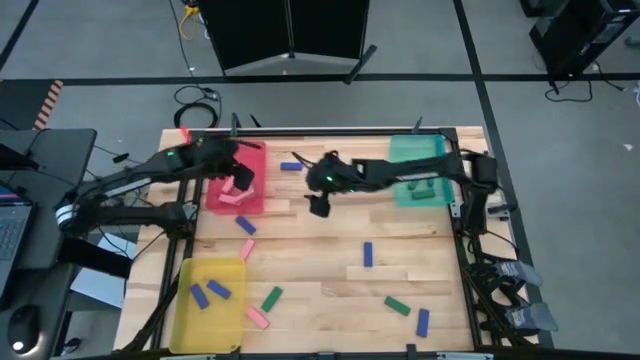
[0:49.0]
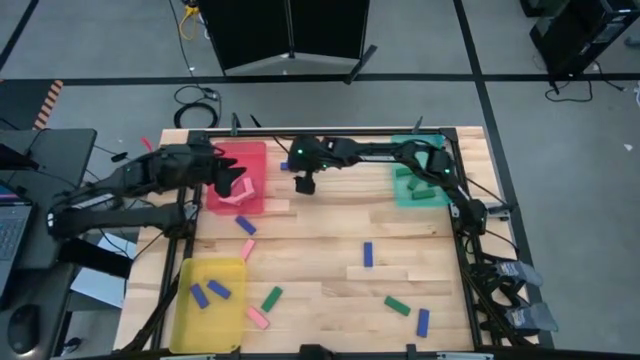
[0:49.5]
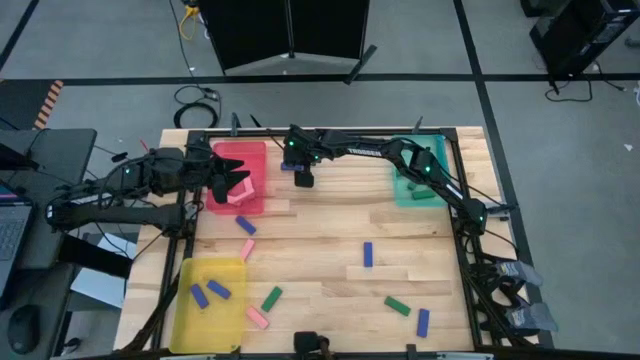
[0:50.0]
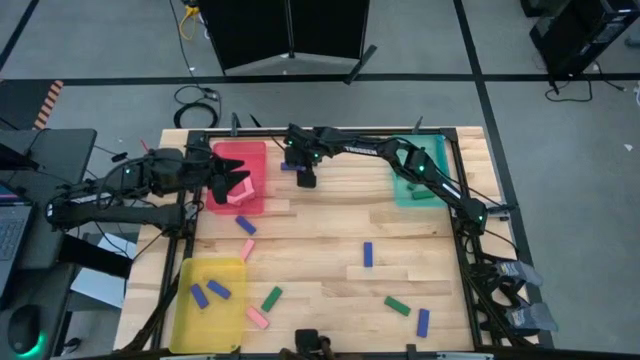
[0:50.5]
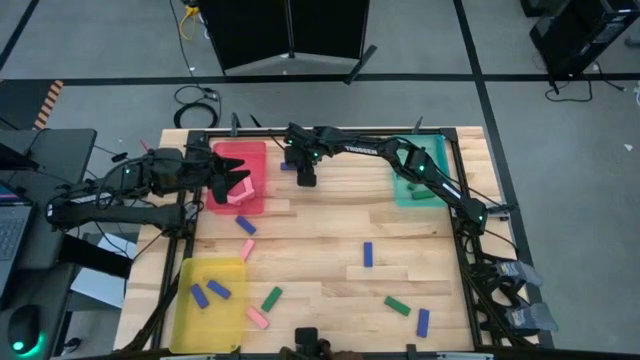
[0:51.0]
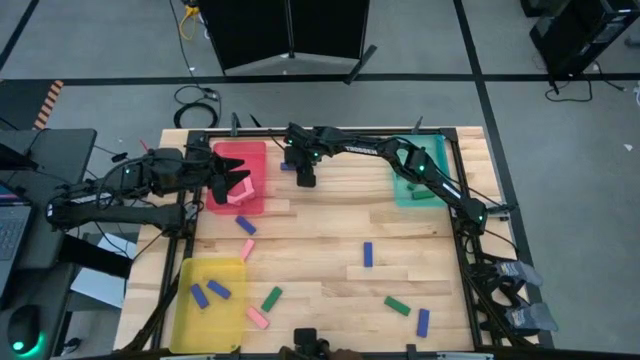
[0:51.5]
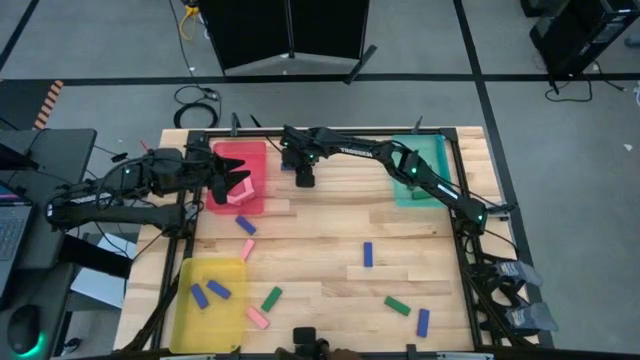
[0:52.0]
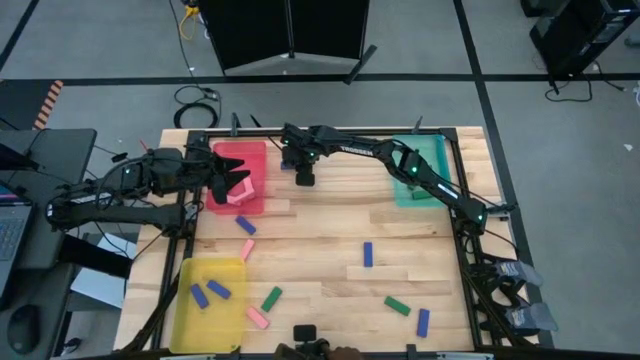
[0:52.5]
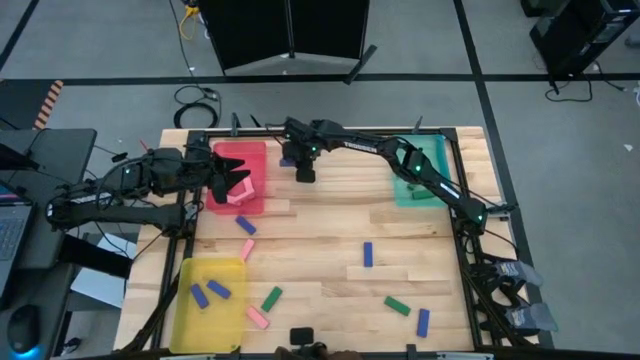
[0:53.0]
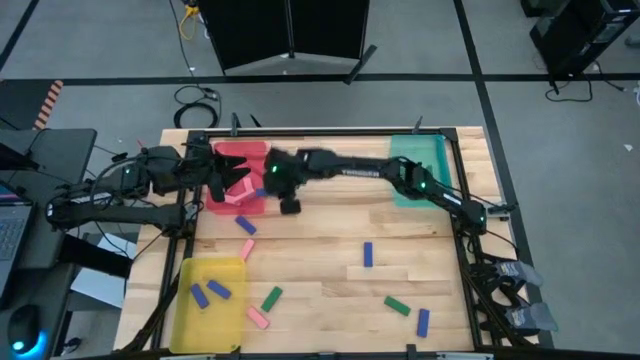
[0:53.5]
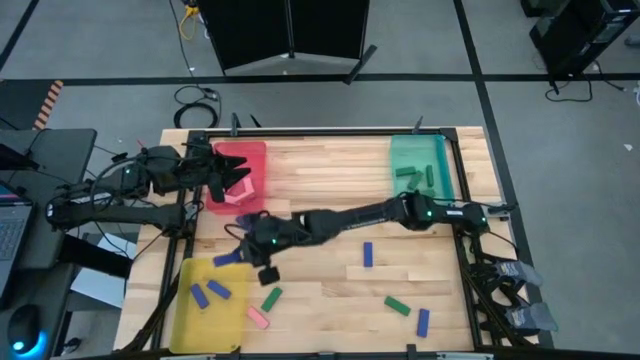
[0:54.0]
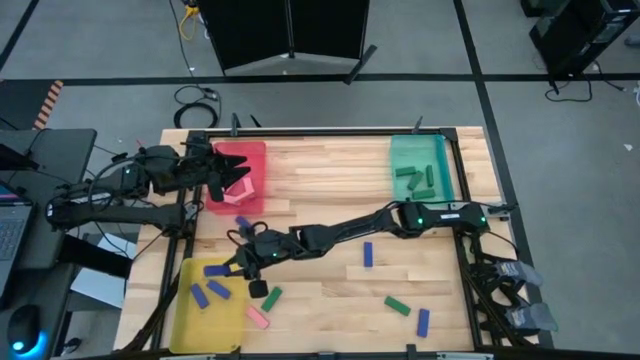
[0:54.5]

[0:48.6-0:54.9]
Task: Sort blocks
Put the blue block into the yellow bin

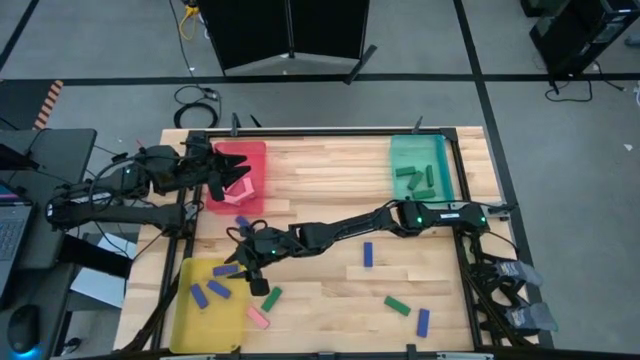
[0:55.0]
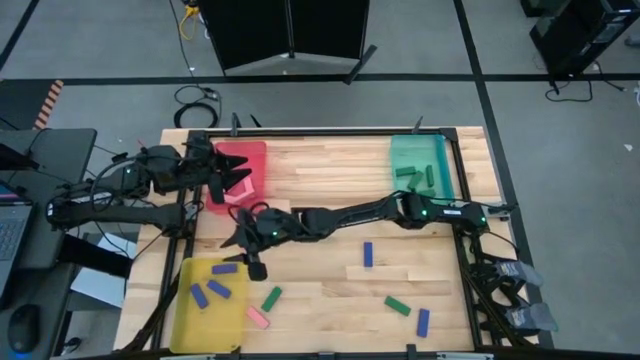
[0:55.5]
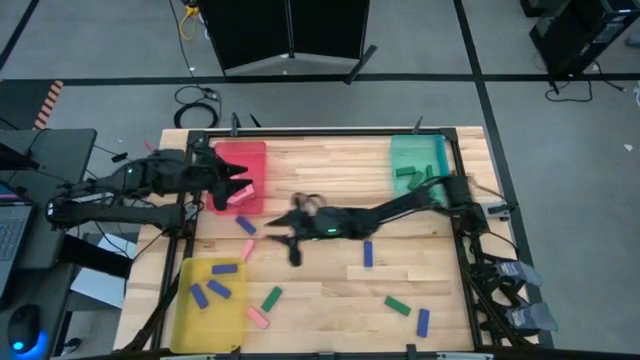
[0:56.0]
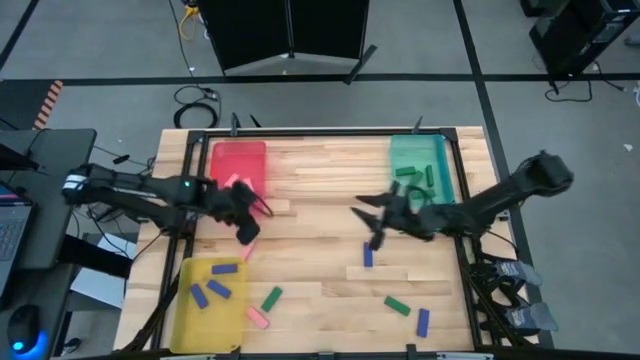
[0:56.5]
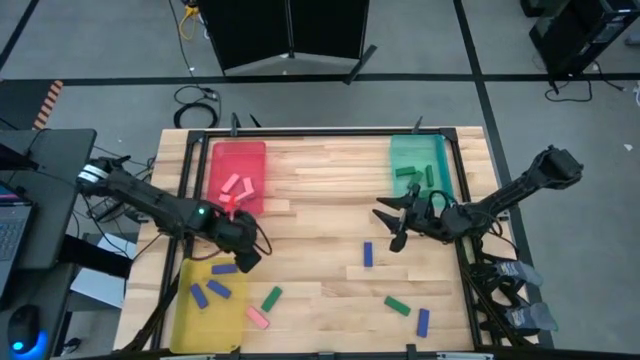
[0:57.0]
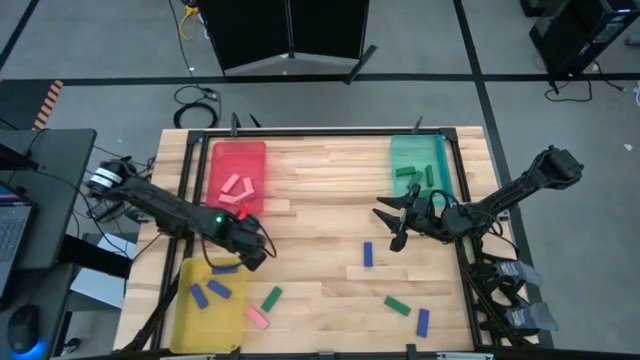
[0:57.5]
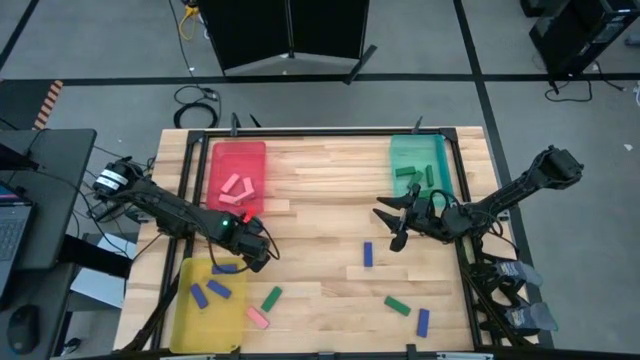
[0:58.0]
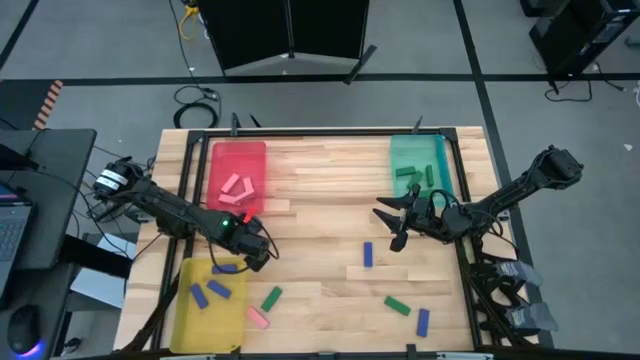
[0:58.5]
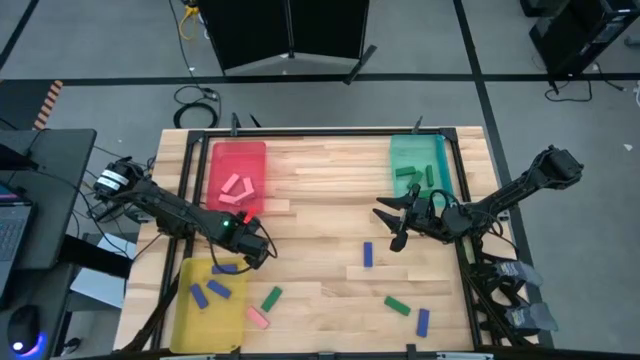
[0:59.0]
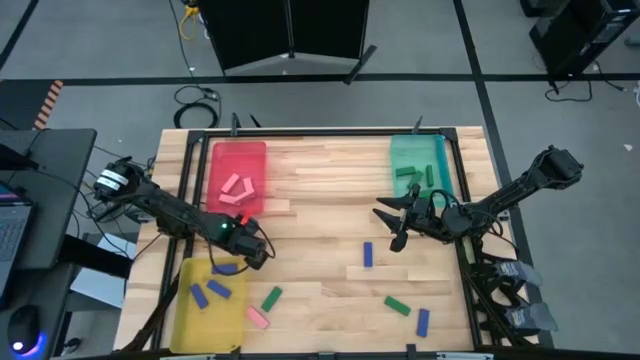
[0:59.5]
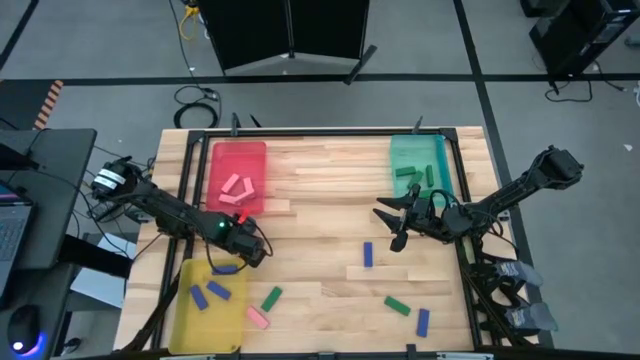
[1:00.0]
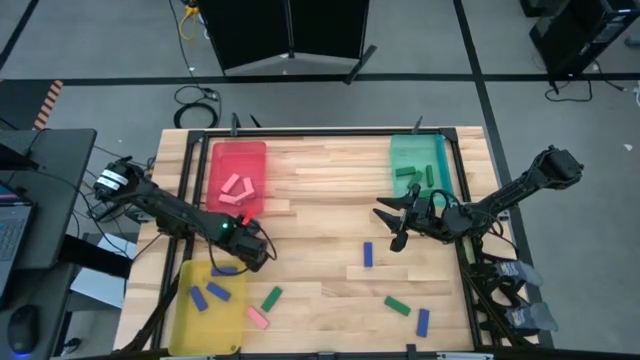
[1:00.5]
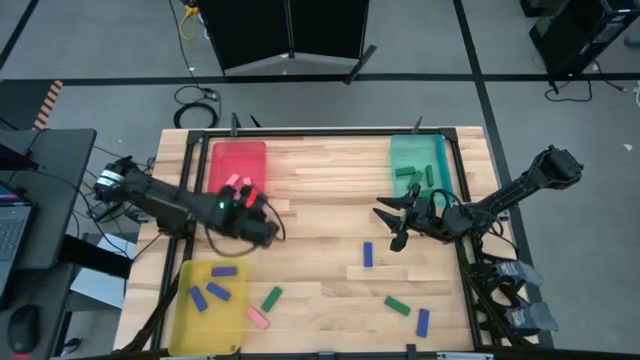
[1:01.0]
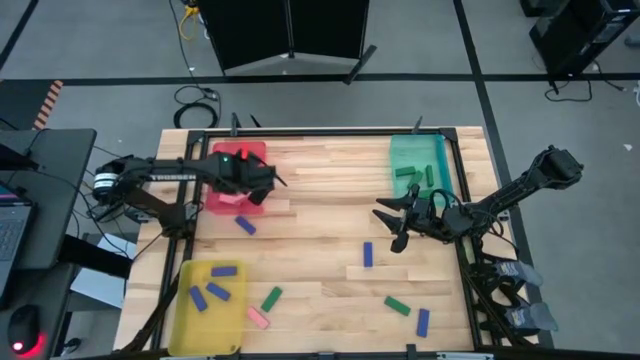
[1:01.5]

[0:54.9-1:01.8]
Put the pink block into the red bin

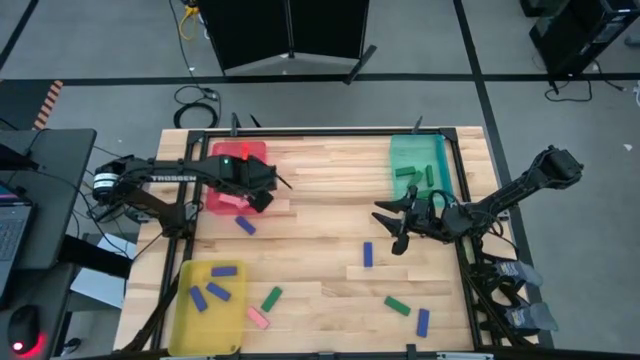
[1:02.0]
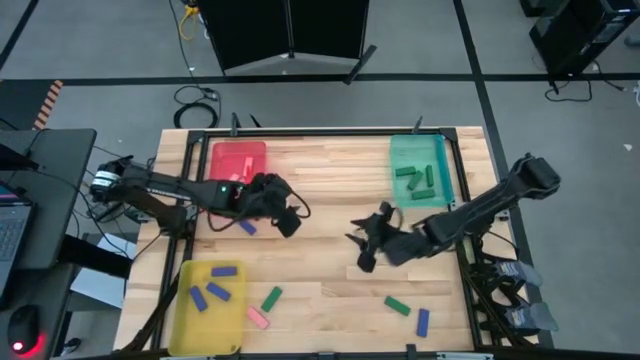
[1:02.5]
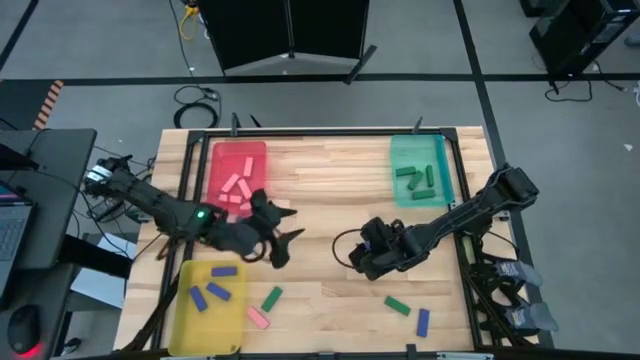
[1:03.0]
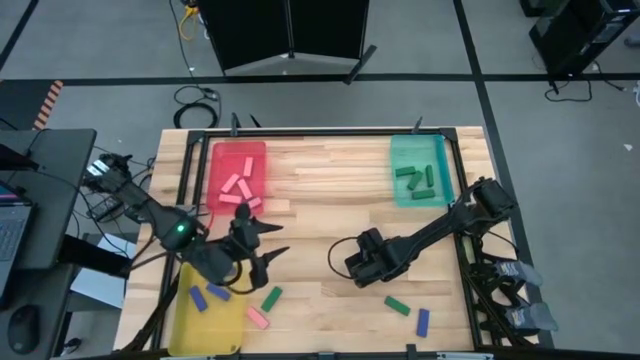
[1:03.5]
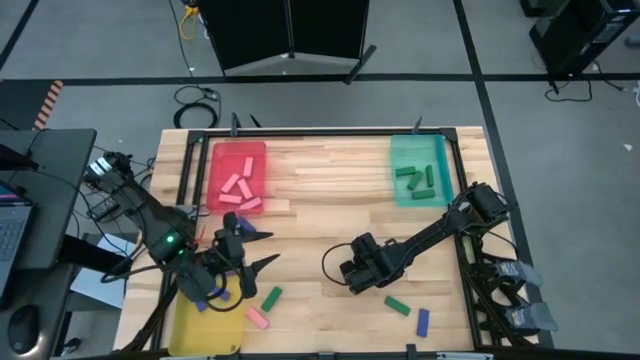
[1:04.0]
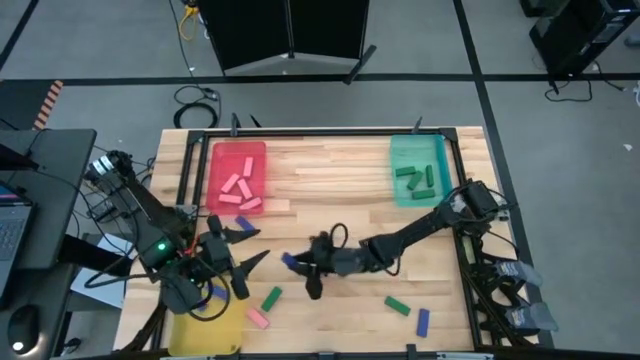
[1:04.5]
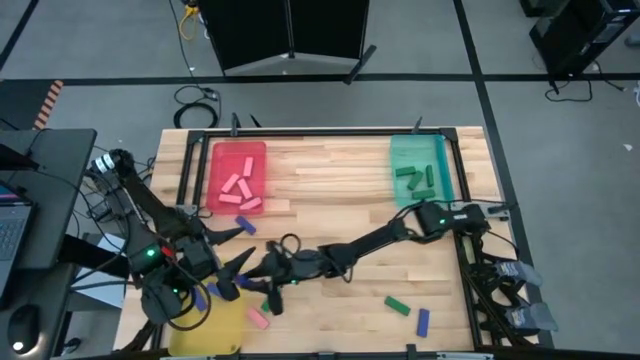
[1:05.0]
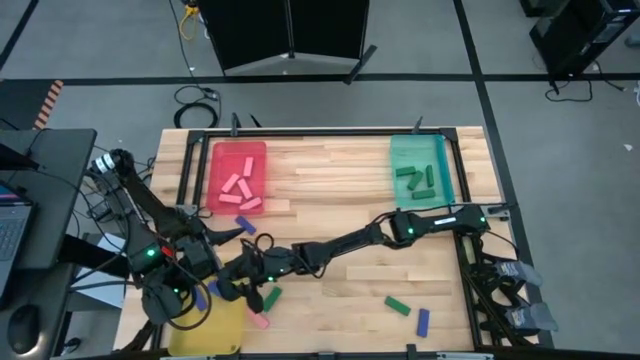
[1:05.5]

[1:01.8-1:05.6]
Put the blue block into the yellow bin

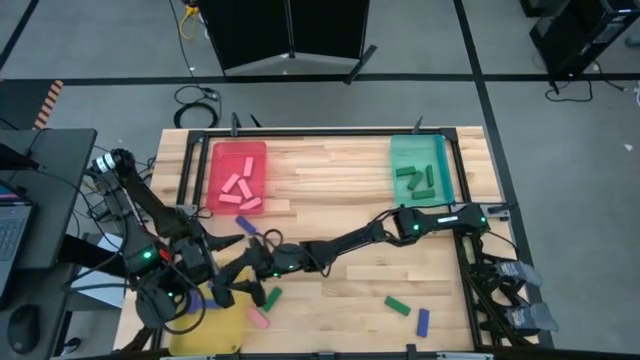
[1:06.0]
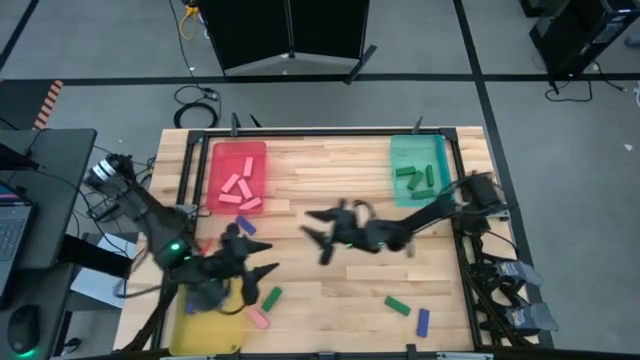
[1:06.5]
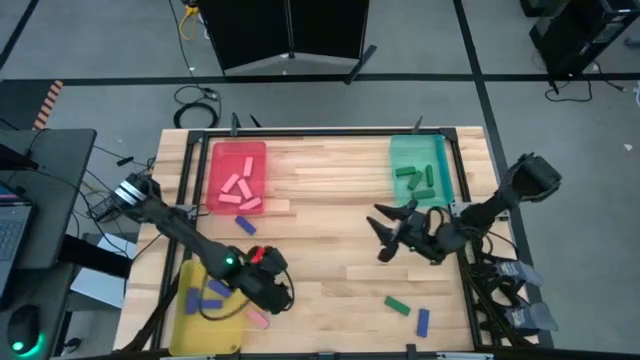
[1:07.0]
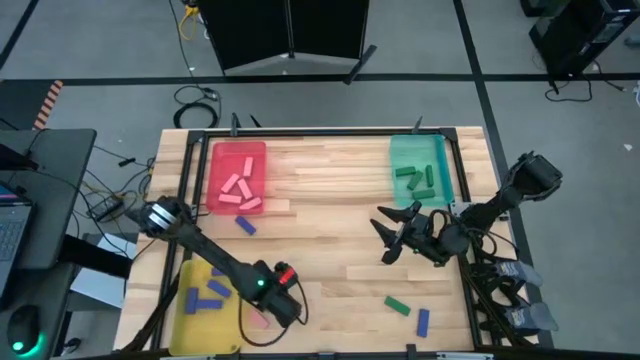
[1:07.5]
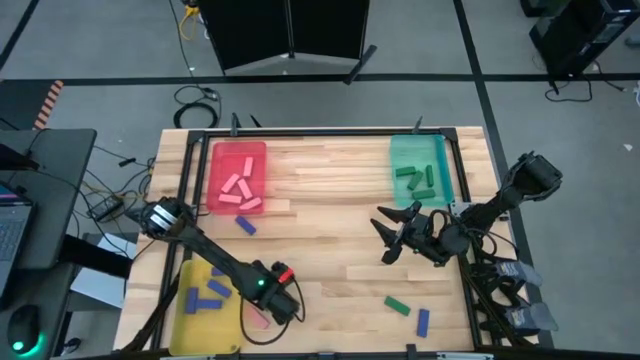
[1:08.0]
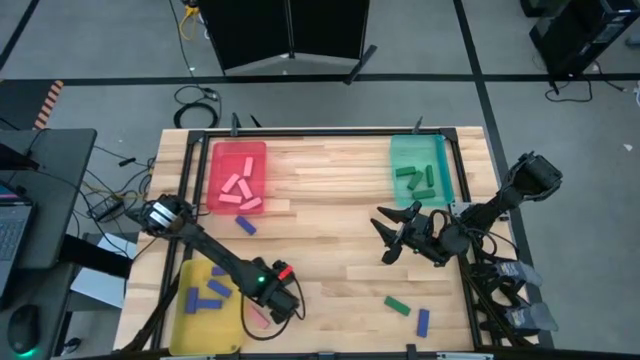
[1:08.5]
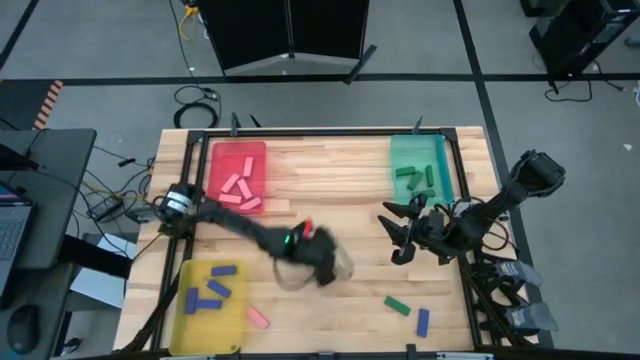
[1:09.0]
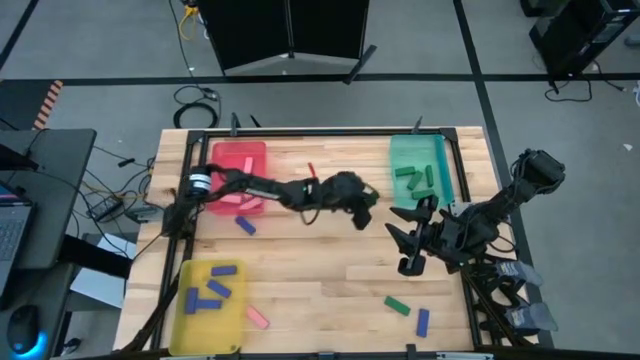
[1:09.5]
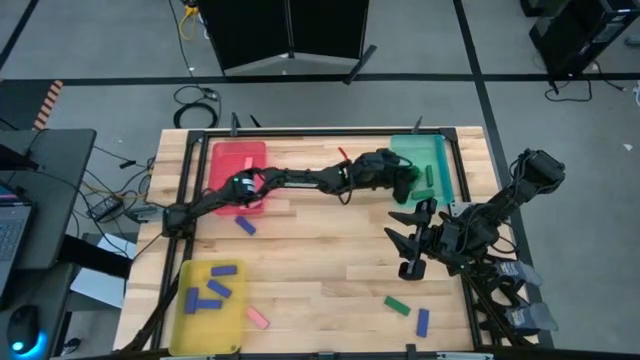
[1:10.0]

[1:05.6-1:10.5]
Put the green block into the blue bin
